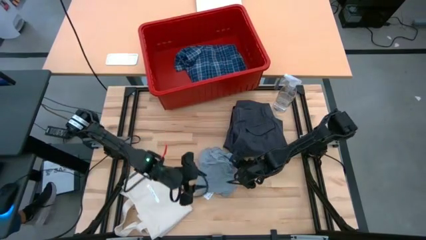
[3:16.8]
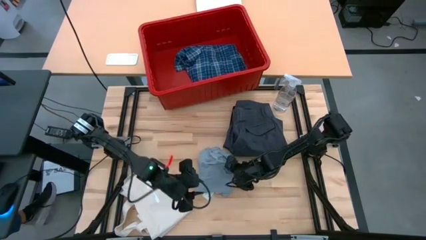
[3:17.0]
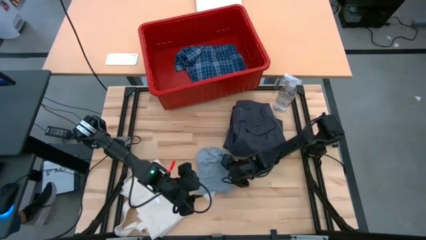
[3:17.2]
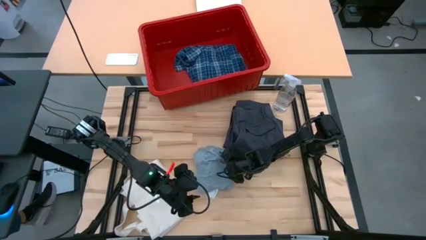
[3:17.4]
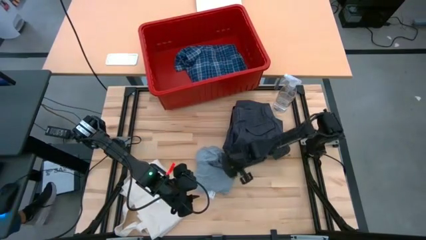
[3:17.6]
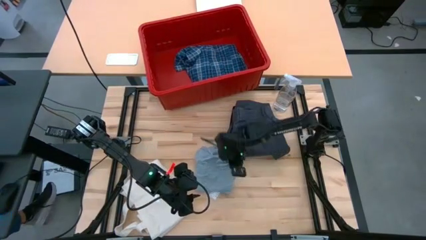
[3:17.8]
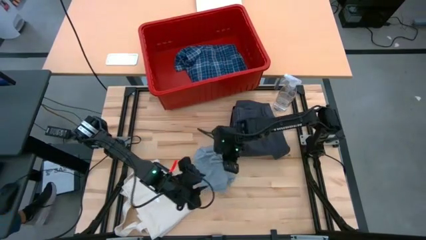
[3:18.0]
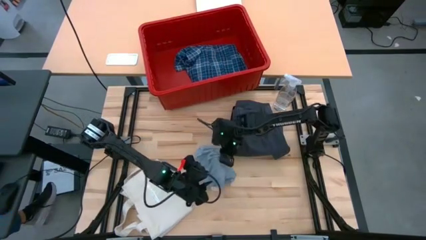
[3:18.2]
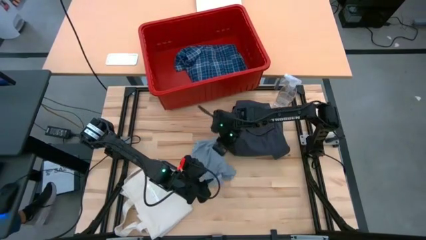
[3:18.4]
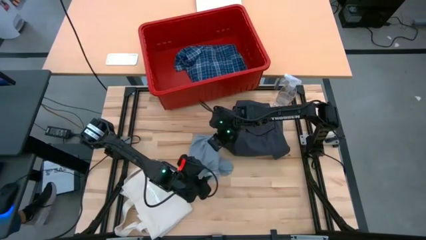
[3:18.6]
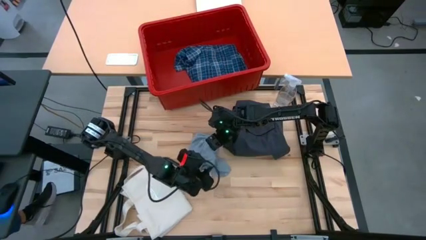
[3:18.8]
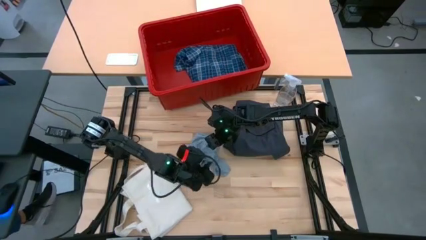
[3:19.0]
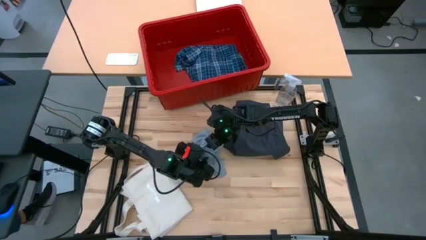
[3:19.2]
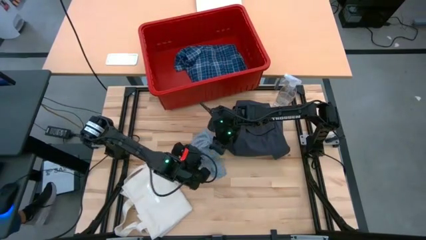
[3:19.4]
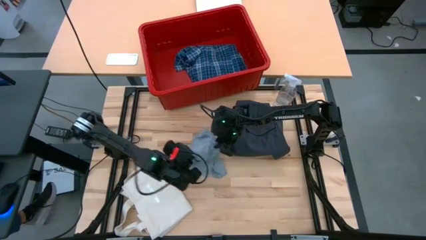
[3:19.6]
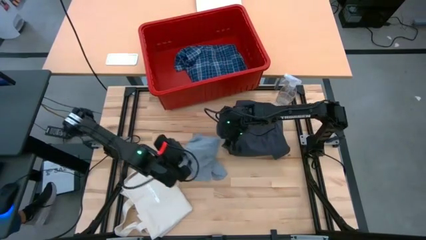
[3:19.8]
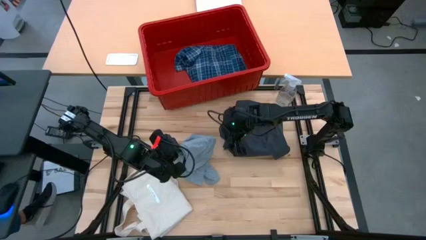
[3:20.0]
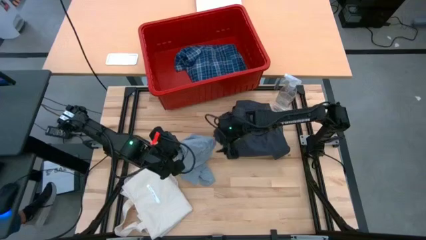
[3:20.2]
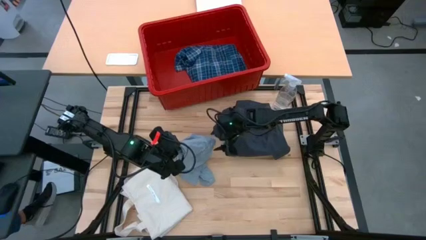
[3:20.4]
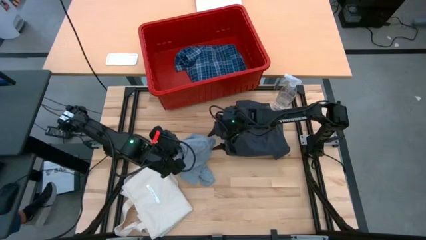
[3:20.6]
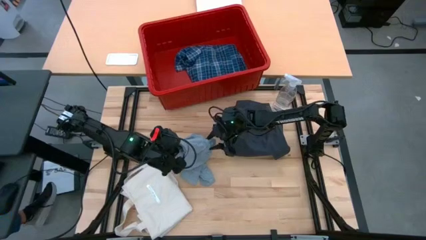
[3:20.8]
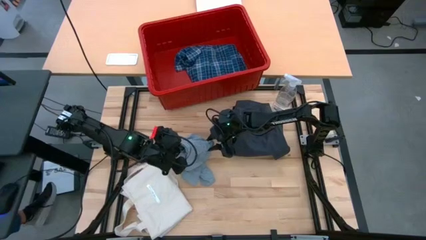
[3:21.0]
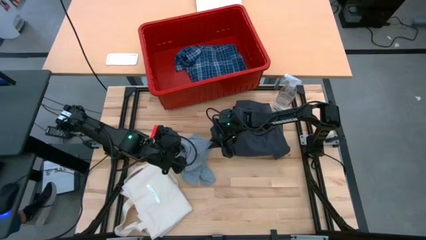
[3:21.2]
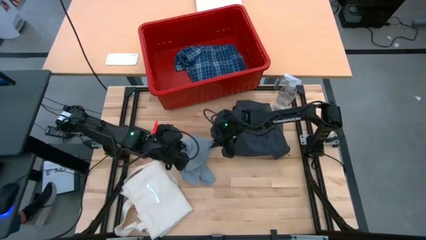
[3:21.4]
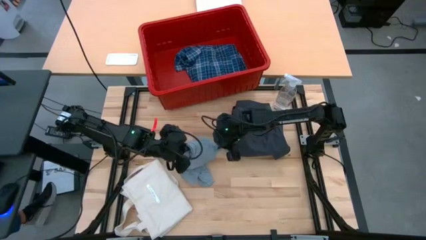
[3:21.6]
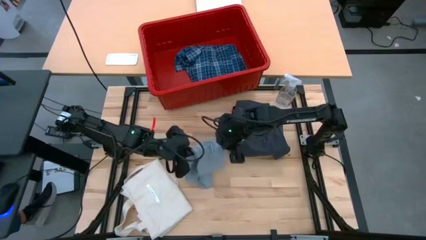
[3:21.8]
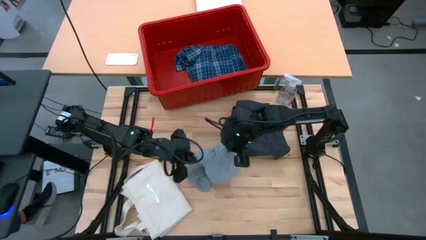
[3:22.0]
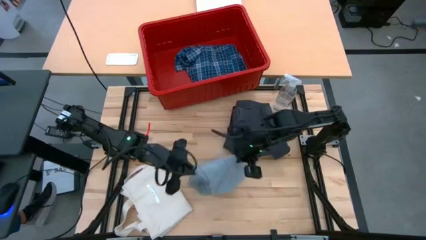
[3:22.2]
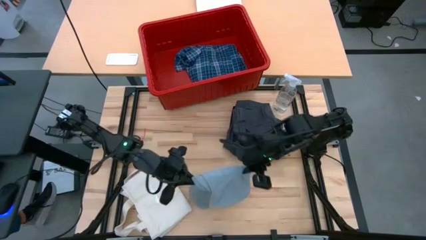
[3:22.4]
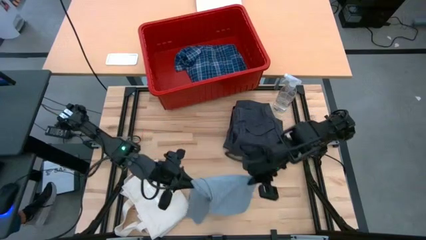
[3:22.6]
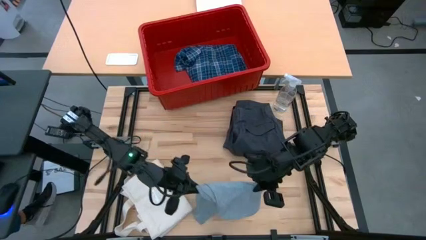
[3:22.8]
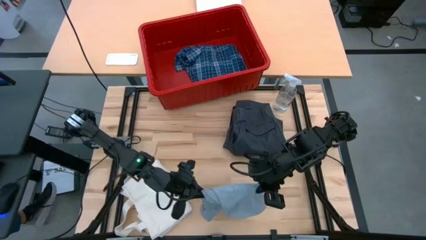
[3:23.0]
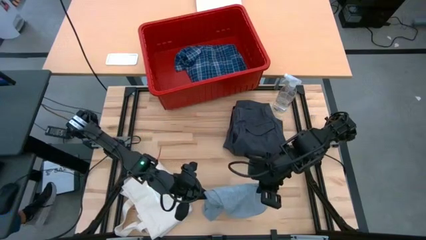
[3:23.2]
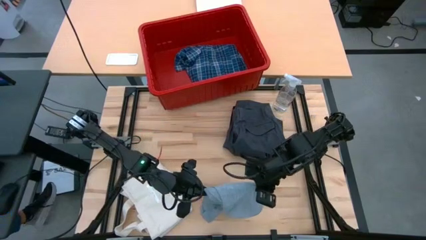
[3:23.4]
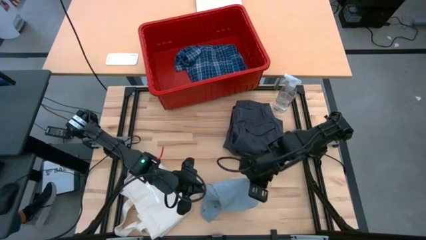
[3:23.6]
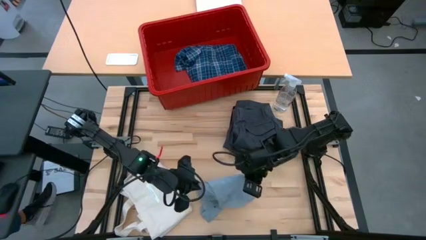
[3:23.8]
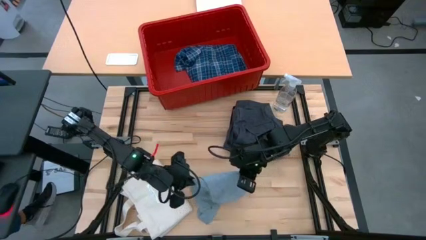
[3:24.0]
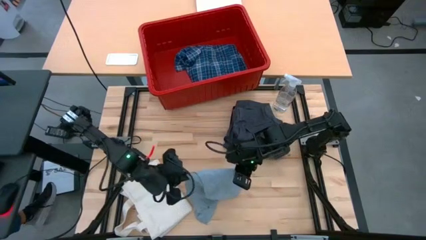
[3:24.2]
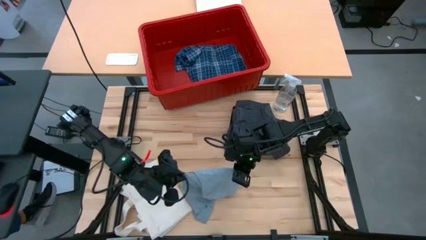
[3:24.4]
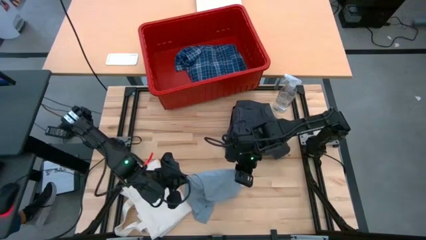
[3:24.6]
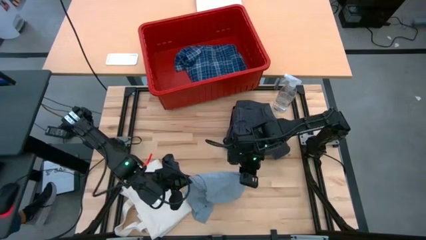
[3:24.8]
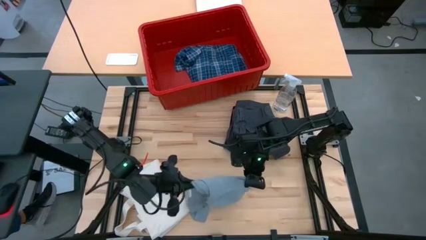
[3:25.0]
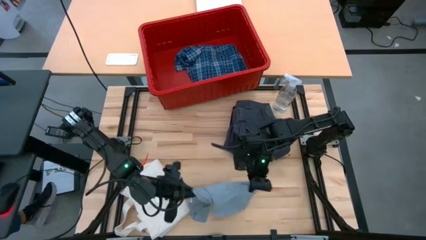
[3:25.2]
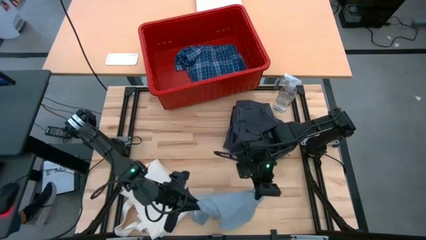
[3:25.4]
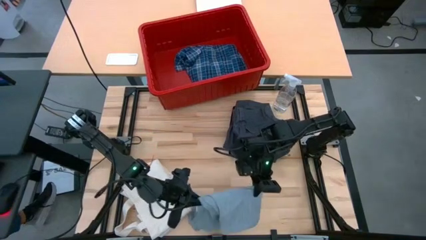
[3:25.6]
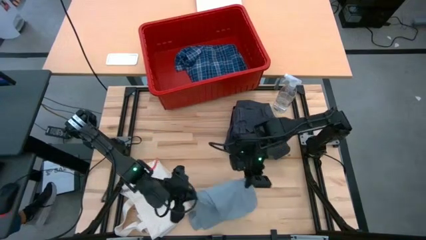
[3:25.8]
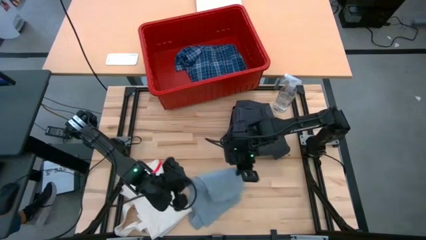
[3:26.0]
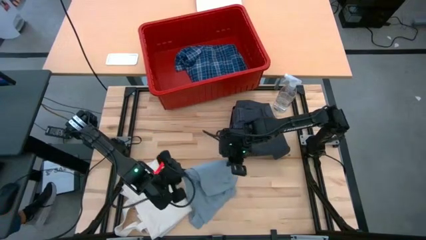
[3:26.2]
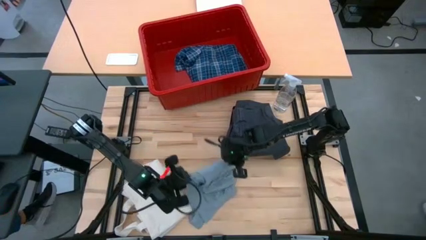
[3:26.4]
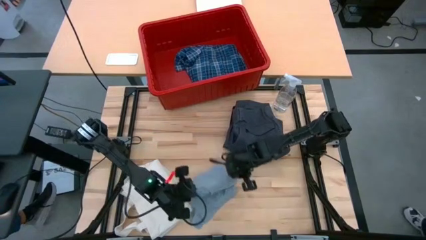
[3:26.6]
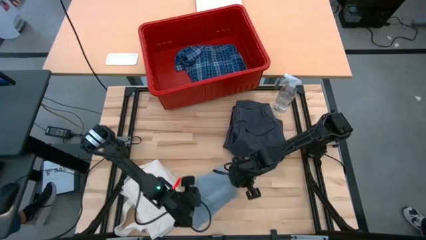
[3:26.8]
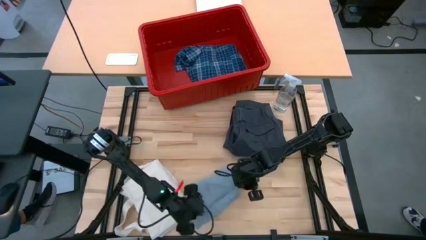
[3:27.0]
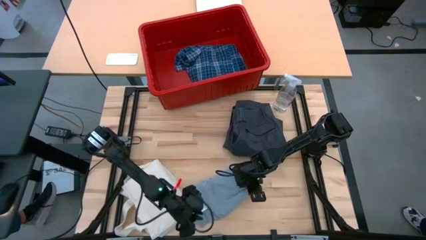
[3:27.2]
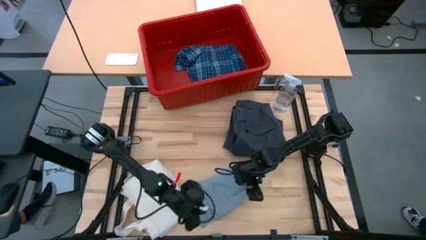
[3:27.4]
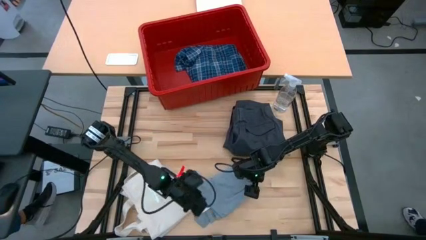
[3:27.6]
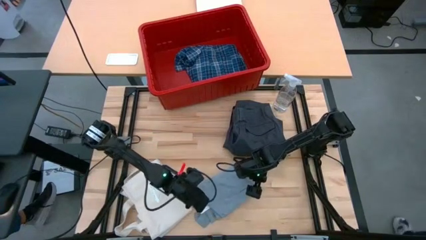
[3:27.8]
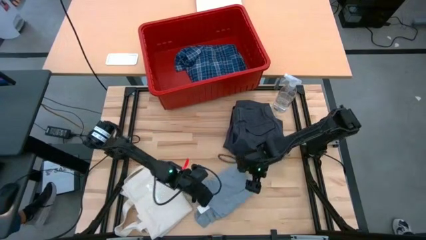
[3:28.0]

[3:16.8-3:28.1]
Task: Fold Laundry from Bin
Fold the gray shirt

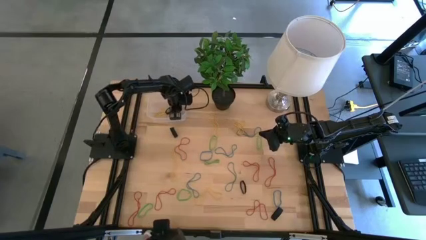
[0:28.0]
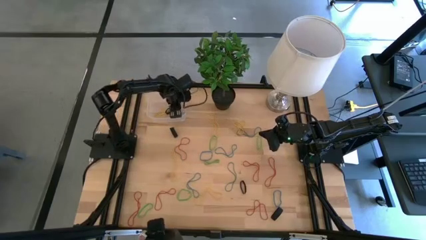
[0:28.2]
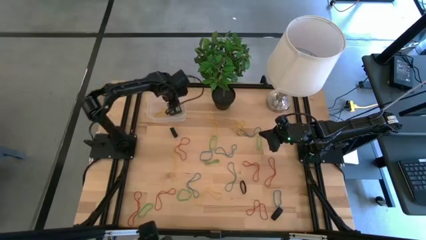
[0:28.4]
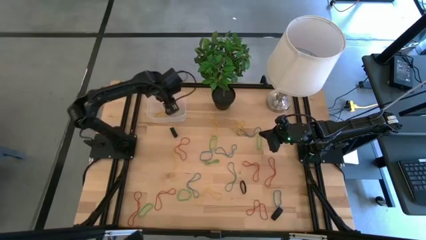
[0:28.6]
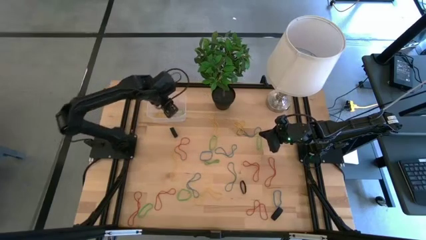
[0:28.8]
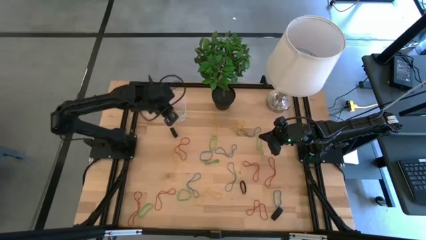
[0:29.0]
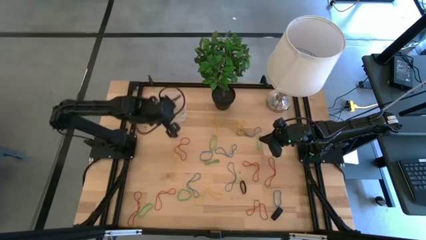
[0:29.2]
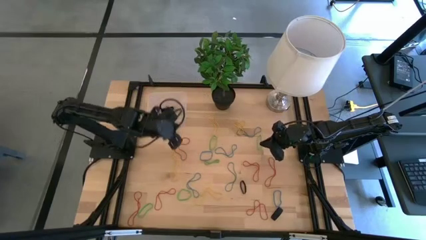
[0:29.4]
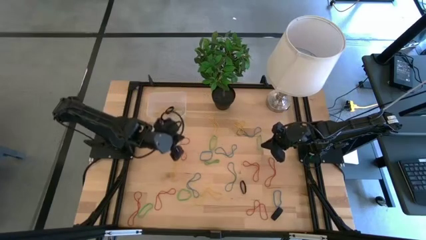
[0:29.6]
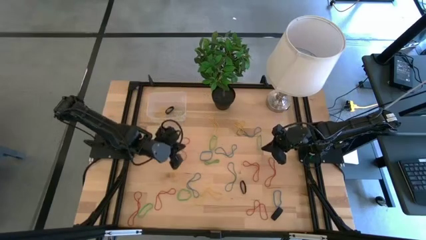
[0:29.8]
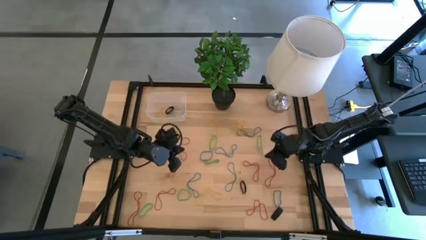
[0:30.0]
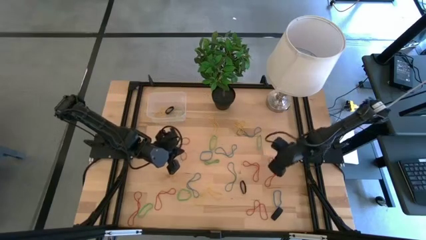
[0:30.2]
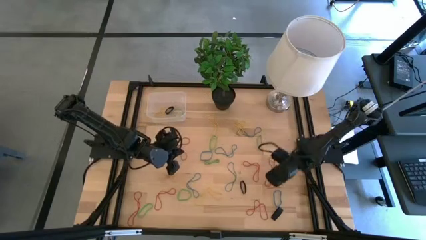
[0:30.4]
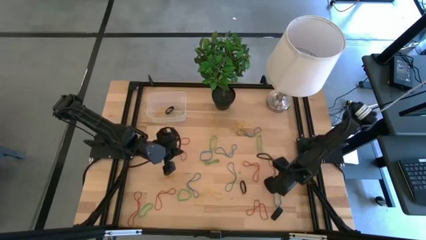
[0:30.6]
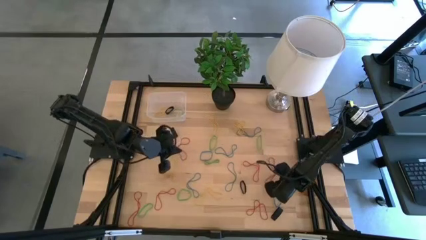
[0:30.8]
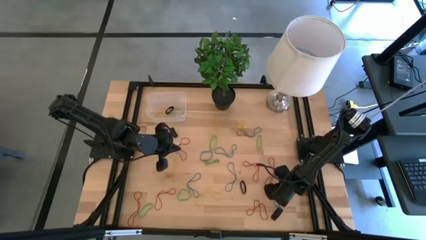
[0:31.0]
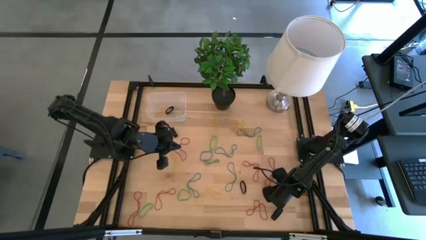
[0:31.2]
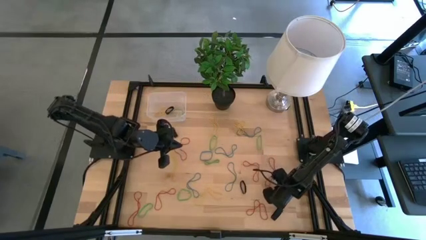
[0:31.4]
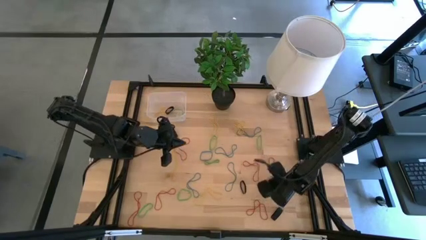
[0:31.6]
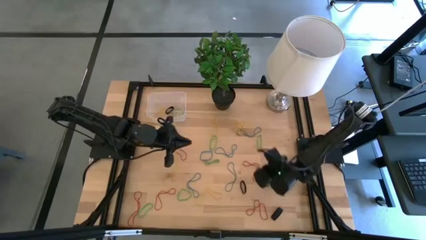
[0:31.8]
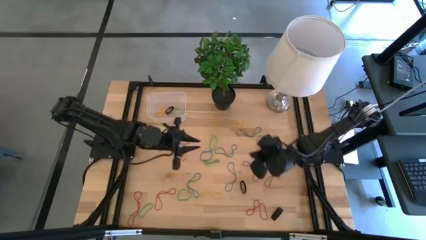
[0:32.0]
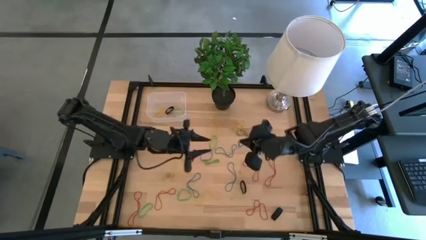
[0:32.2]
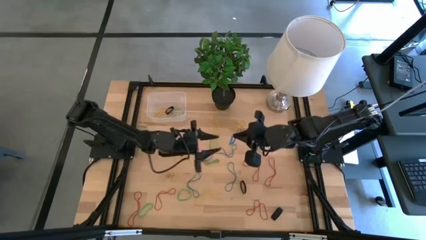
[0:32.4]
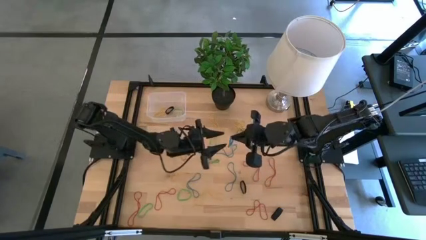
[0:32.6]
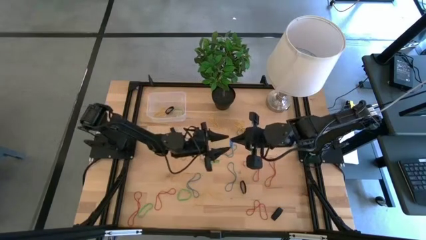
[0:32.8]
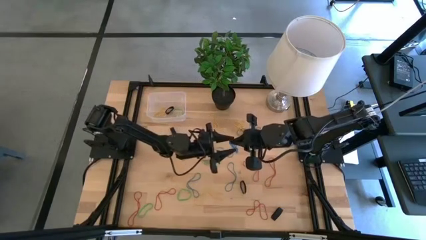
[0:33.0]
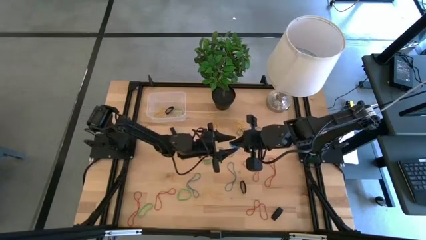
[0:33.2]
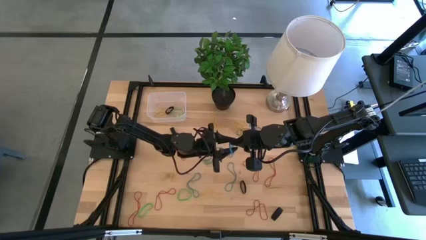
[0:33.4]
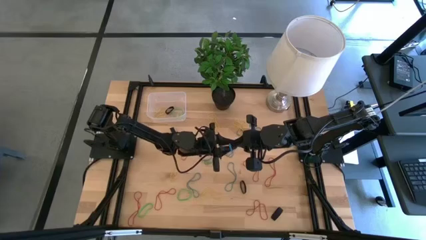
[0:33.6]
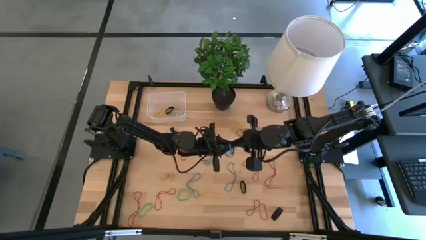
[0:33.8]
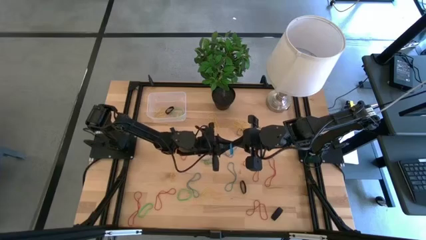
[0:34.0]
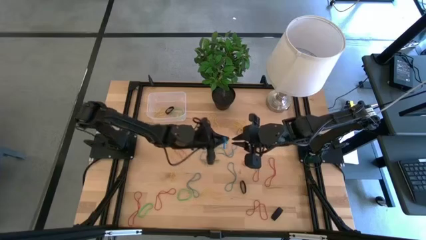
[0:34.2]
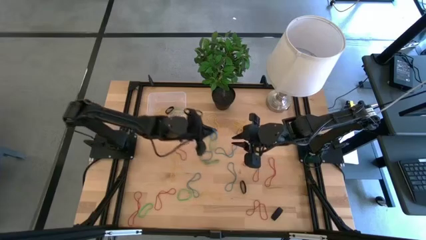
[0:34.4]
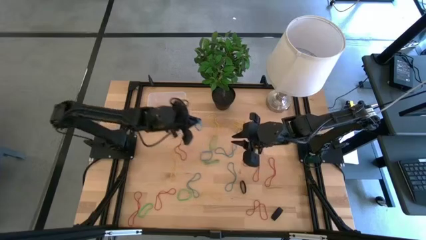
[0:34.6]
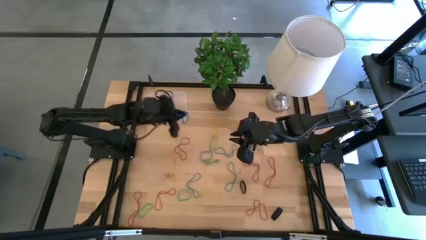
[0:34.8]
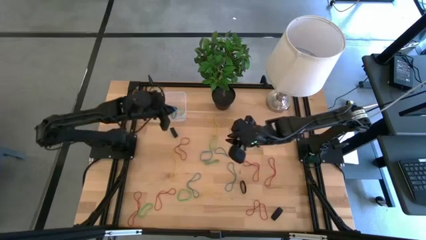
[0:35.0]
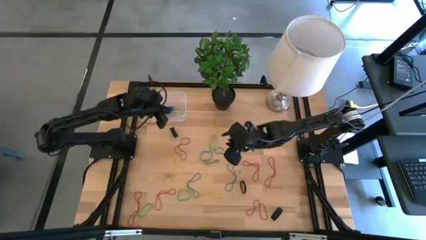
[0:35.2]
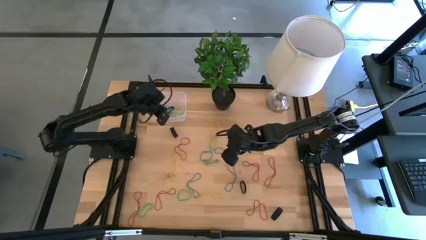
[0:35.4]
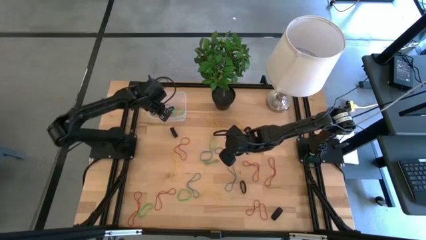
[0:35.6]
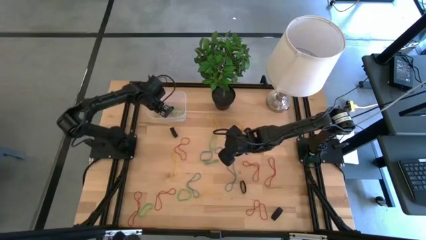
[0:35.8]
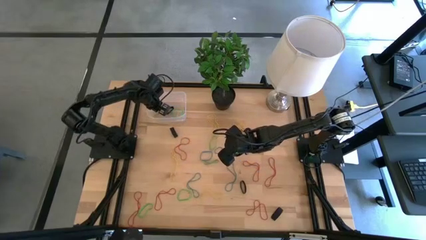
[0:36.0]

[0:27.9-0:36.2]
Task: Pick and place rubber bands into bin
Put the blue rubber band into the transparent bin
